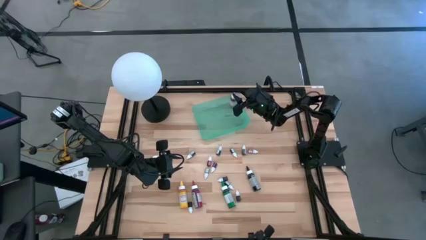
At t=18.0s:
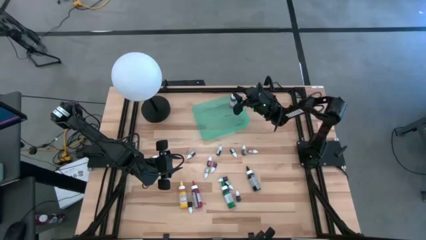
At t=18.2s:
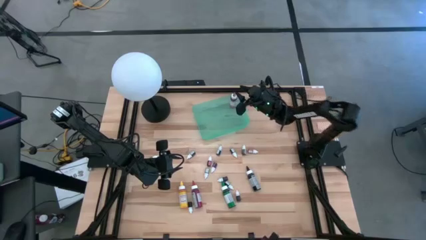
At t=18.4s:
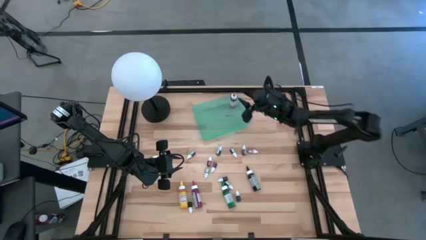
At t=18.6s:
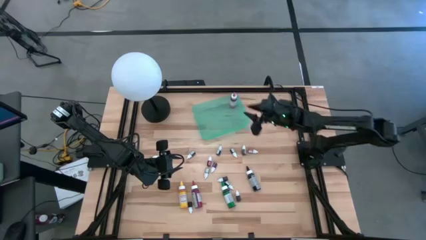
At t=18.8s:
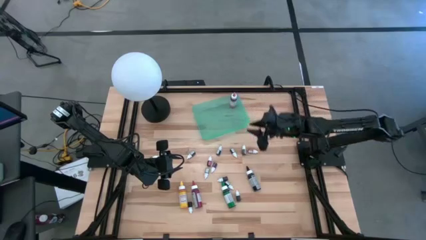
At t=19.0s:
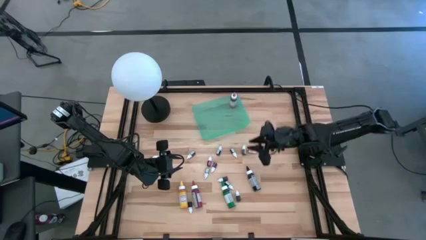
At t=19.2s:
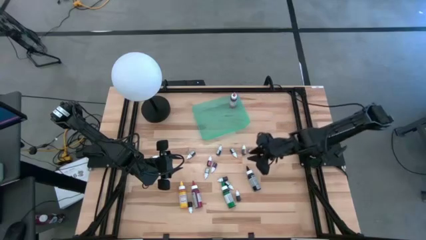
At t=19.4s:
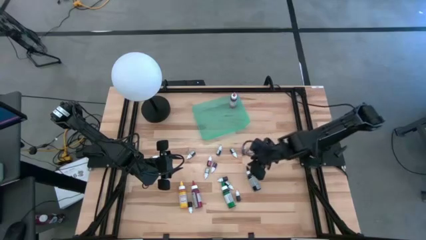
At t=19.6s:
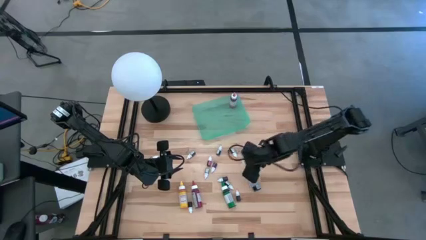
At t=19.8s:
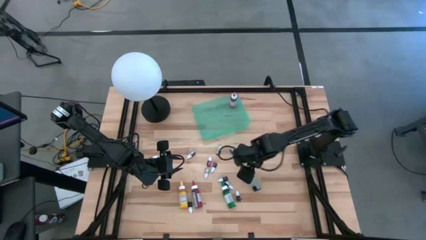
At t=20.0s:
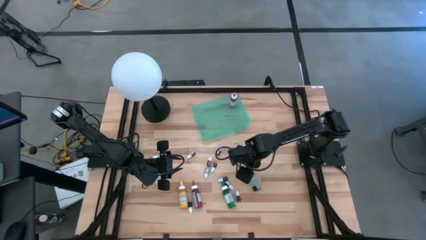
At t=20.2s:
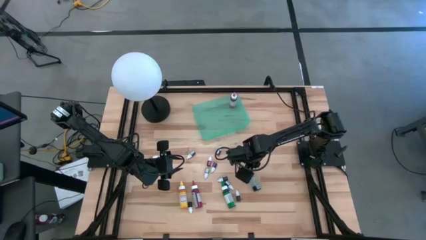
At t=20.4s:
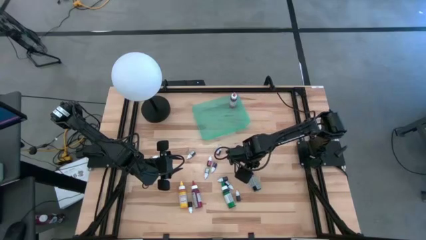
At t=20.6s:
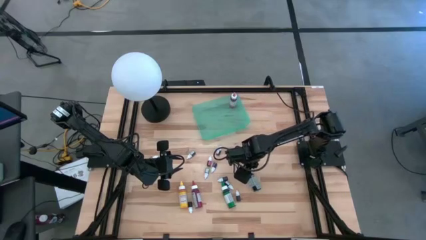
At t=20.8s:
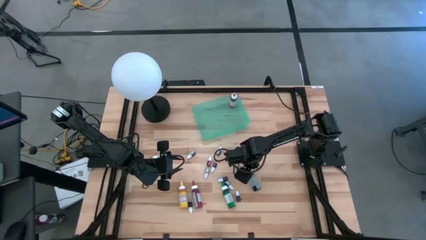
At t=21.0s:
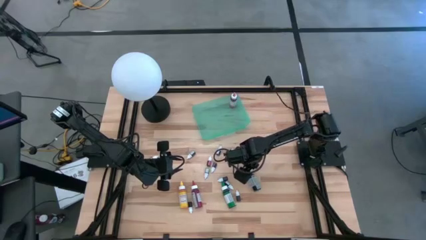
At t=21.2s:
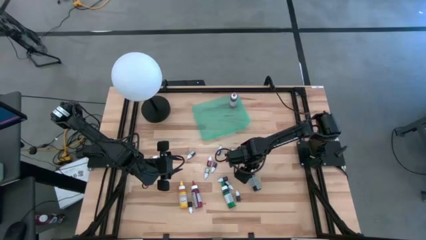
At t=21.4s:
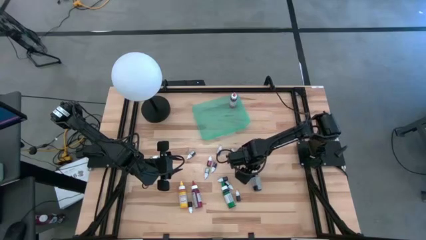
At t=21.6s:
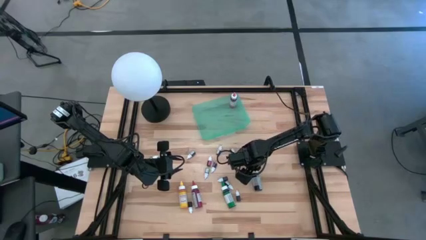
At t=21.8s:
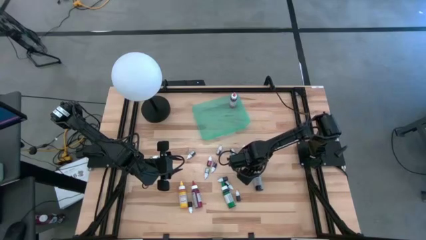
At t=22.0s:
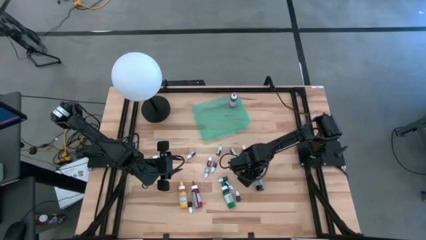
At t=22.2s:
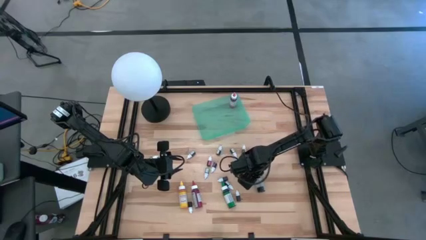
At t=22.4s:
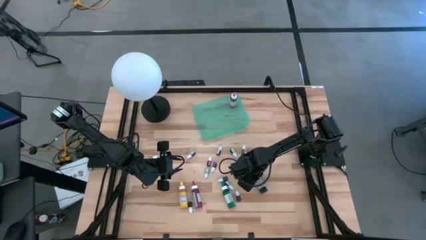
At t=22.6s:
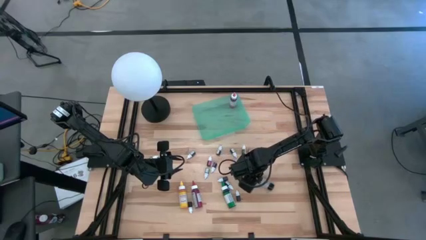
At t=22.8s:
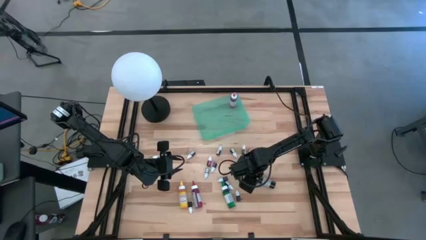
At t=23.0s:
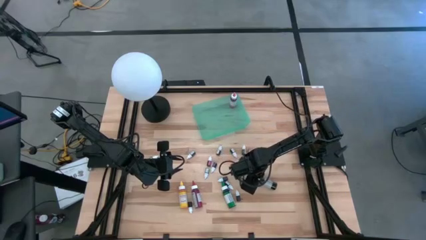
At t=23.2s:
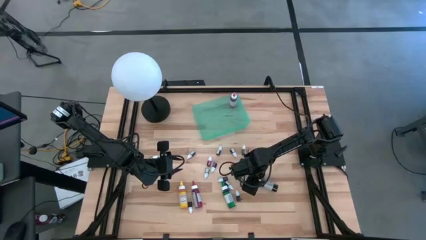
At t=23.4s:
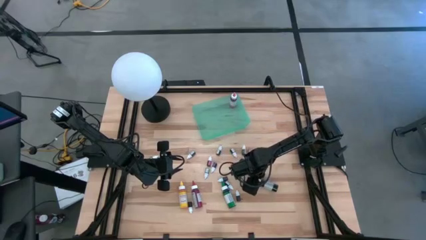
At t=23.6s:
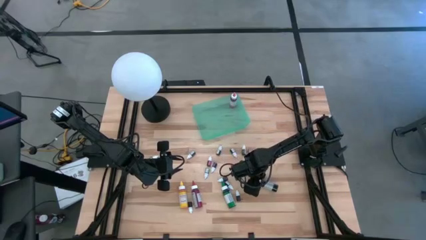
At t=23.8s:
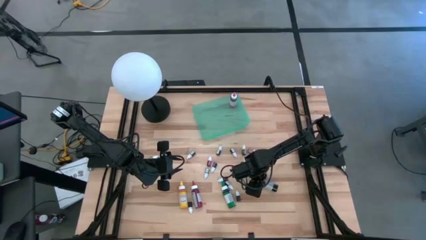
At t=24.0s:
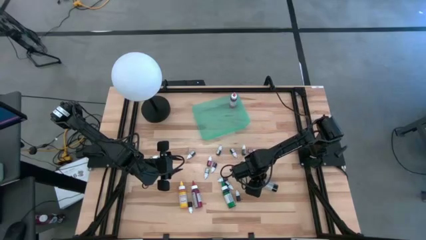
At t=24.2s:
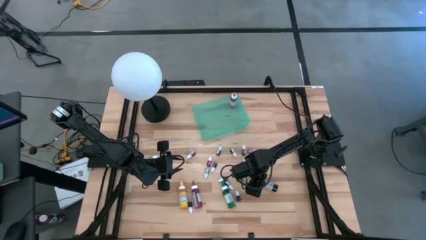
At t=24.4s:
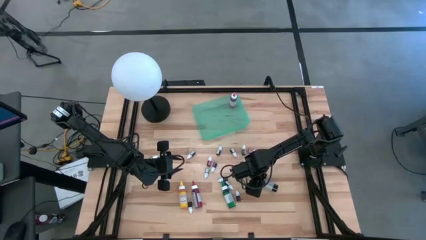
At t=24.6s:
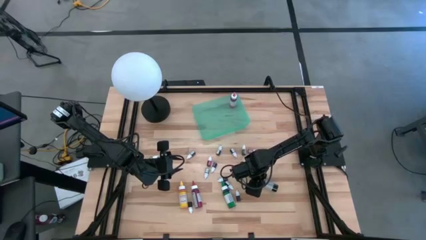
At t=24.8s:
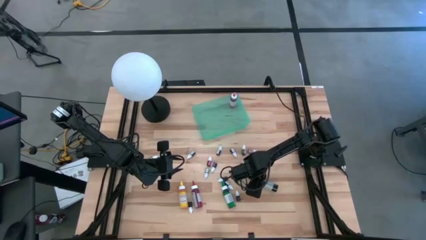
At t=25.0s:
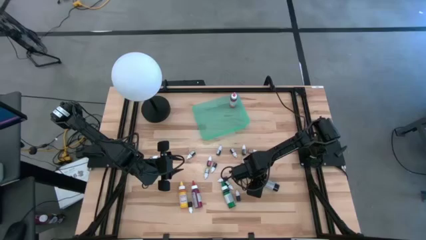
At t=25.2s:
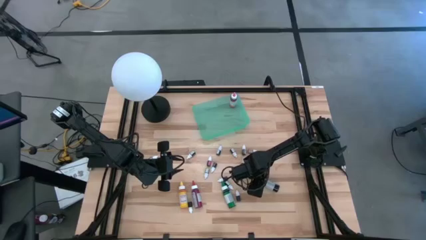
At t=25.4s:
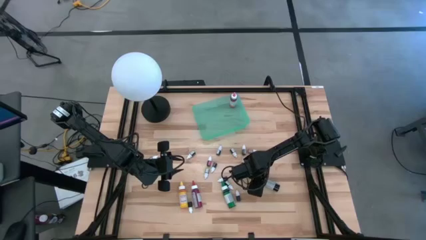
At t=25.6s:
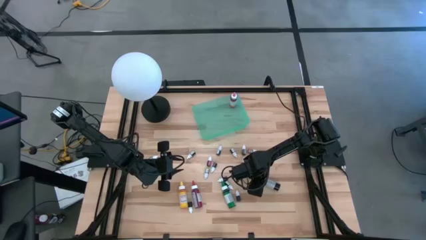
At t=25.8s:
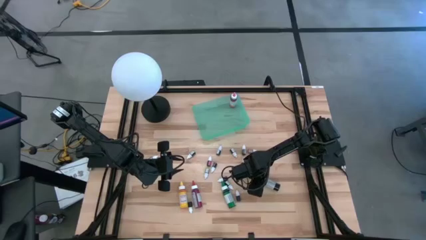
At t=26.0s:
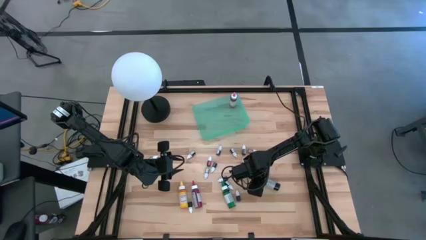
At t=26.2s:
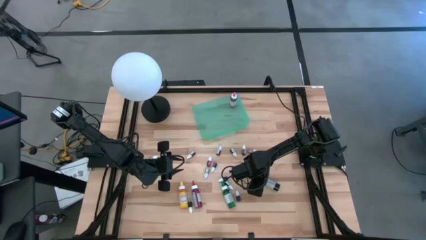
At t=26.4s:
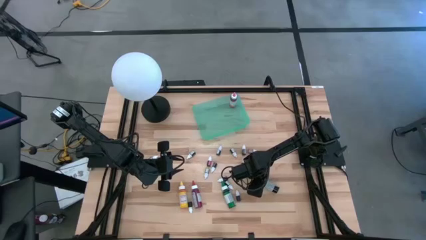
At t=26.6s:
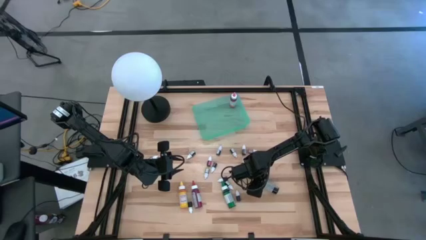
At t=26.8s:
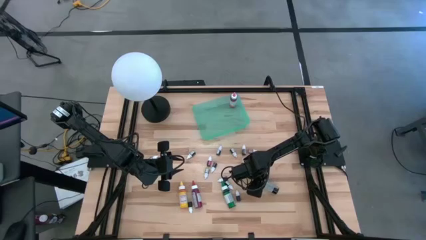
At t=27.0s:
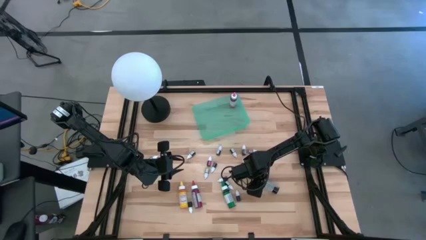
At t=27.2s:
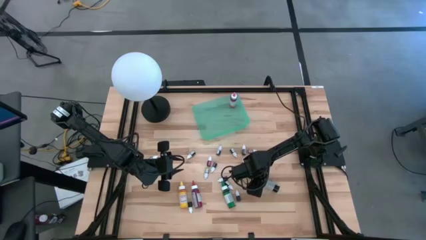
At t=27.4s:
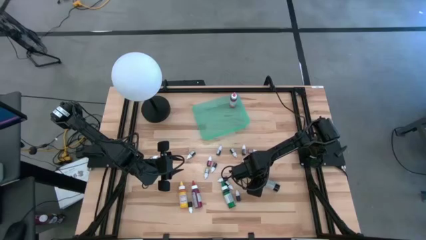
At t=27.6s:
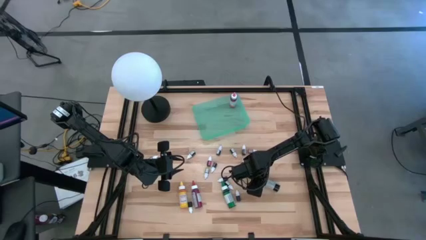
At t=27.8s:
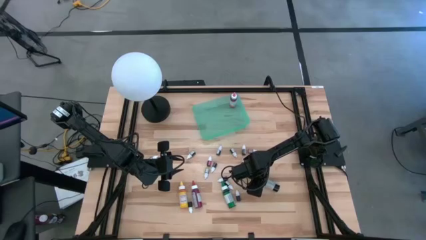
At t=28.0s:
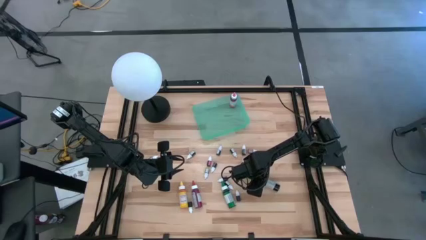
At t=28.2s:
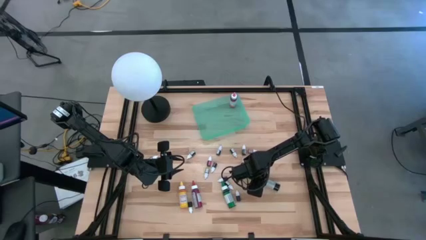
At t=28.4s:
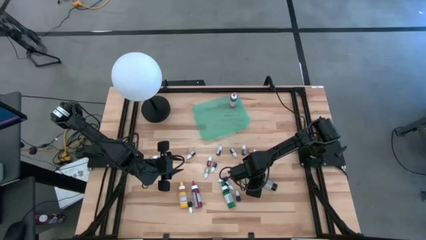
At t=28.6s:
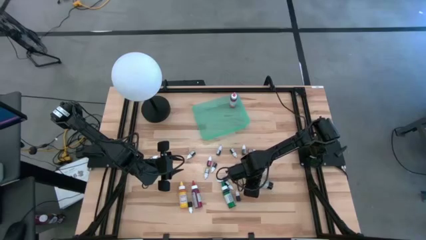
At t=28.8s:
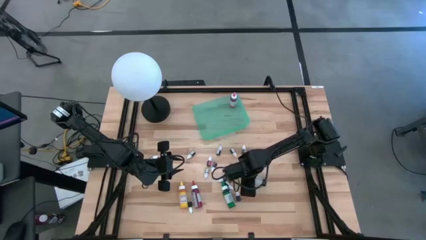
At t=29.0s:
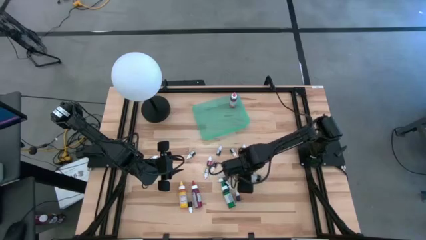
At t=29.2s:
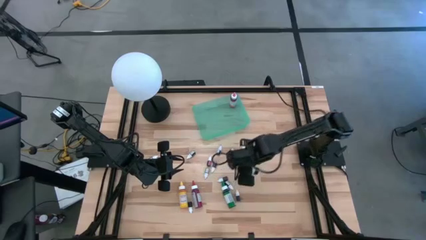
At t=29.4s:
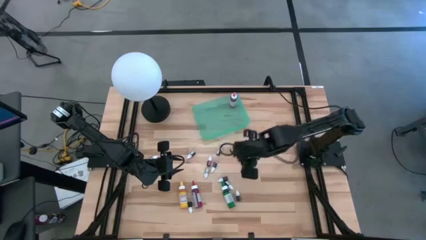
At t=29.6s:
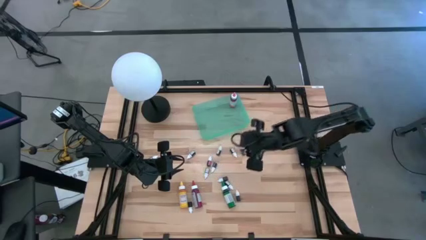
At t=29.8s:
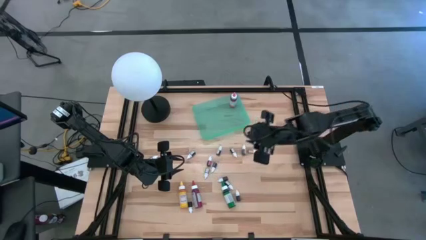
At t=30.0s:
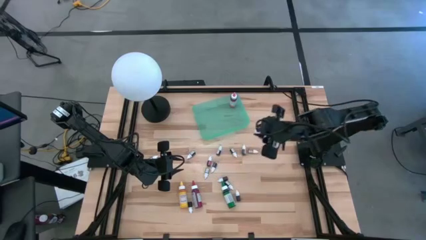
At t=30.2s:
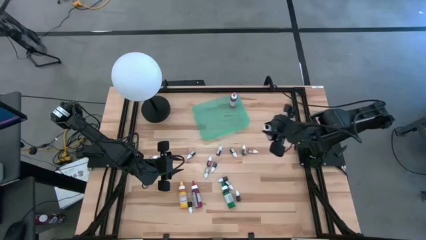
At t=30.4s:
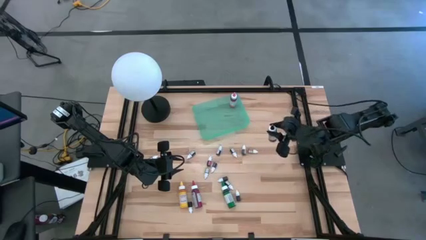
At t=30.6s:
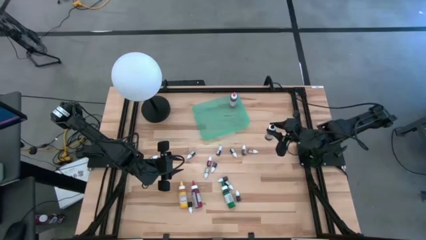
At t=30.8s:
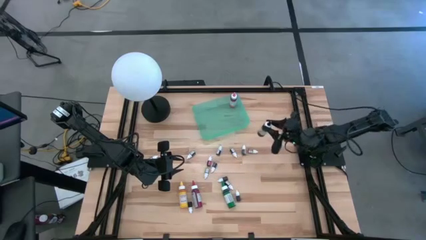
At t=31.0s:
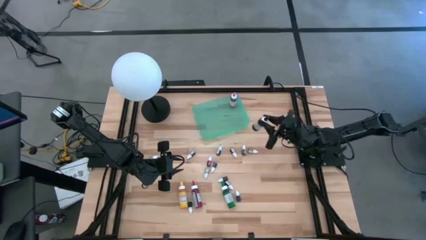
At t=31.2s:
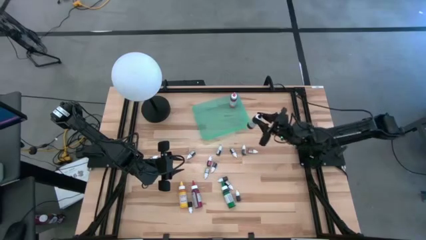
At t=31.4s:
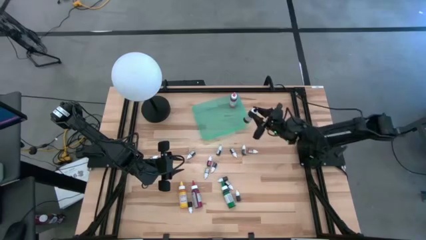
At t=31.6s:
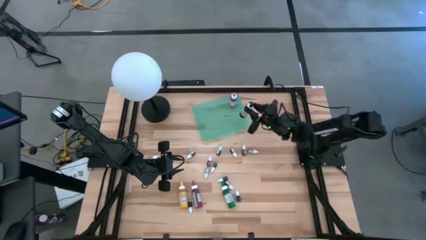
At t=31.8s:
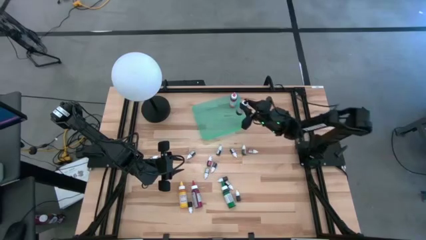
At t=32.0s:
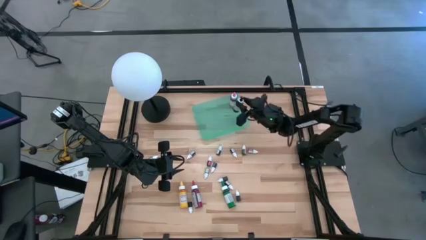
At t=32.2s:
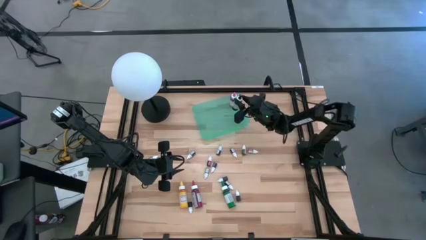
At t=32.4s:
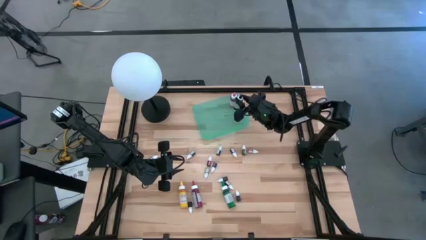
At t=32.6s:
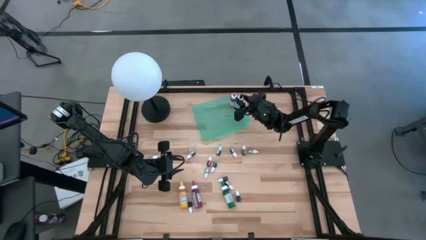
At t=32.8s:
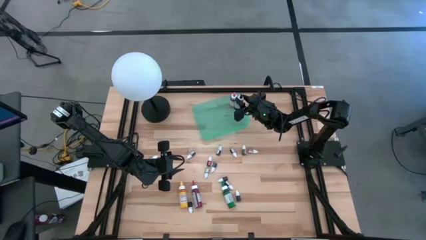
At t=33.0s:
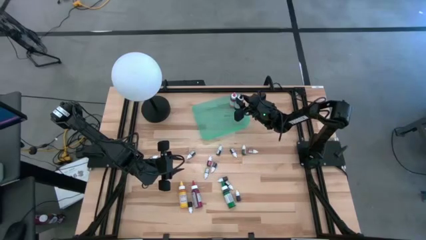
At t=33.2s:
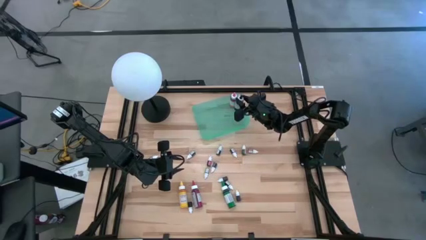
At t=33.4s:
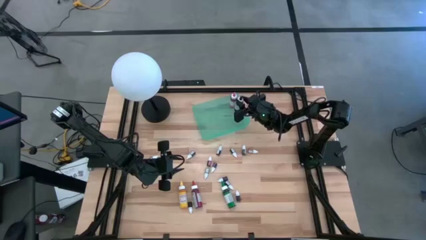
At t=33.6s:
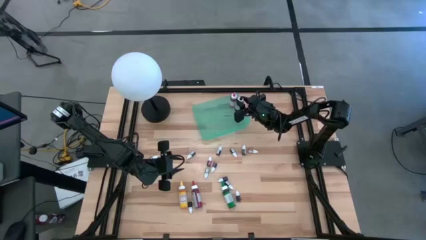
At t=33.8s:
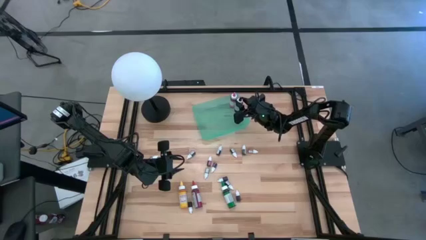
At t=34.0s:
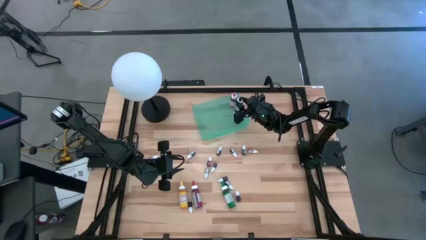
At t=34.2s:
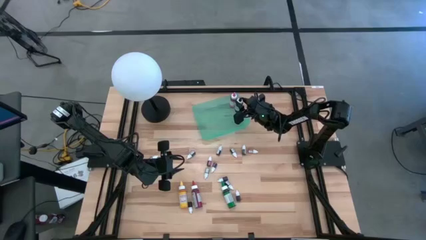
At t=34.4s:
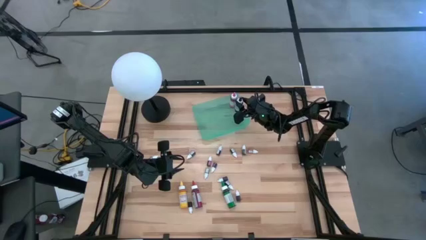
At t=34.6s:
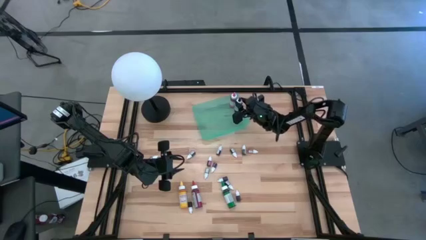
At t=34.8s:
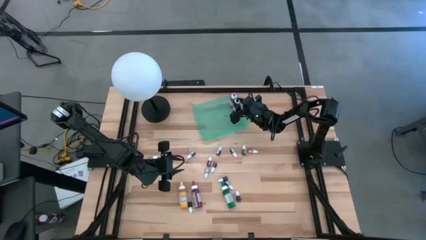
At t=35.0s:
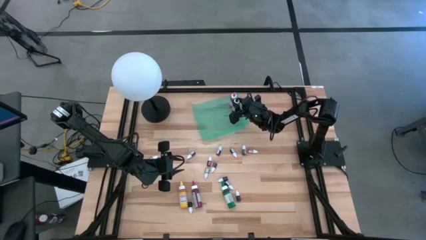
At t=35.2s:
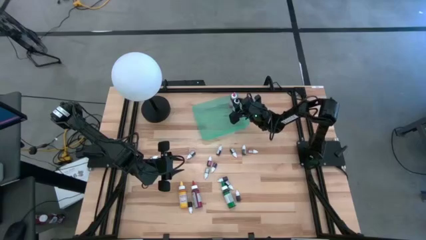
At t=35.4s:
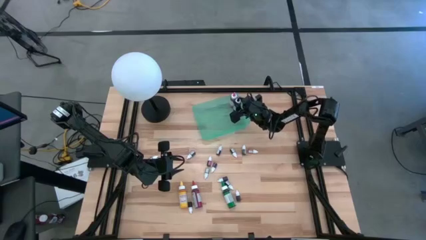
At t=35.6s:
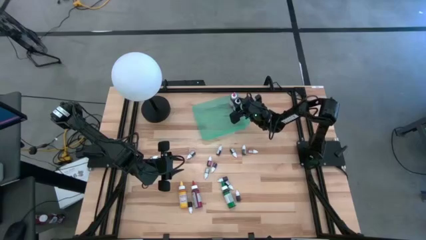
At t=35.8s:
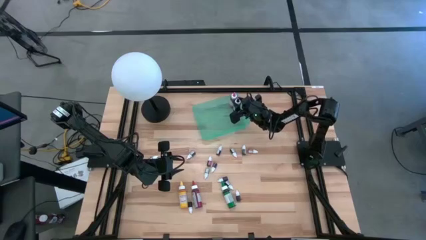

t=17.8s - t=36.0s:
Task: Pick & Place food coloring
Put the black food coloring bottle into the green bin
